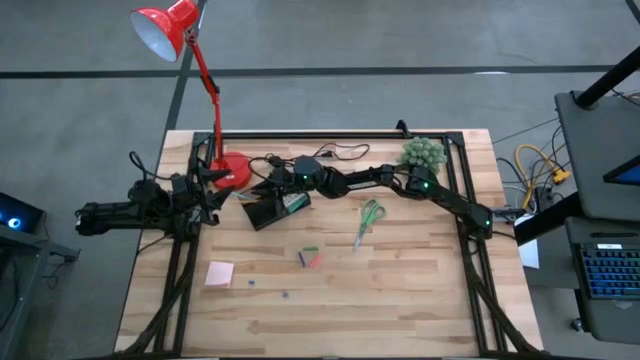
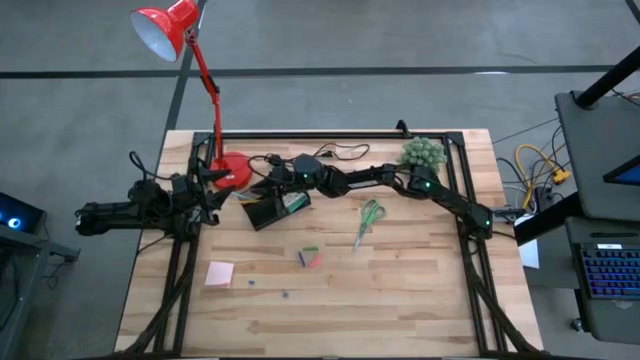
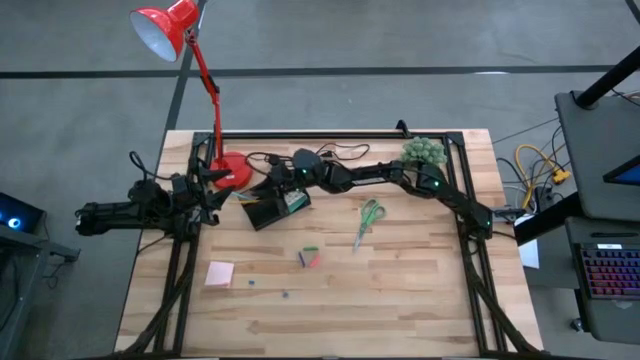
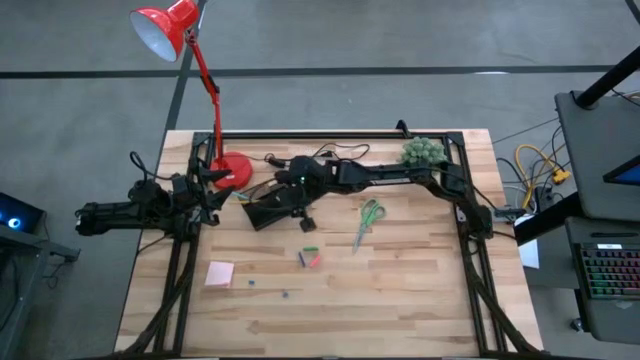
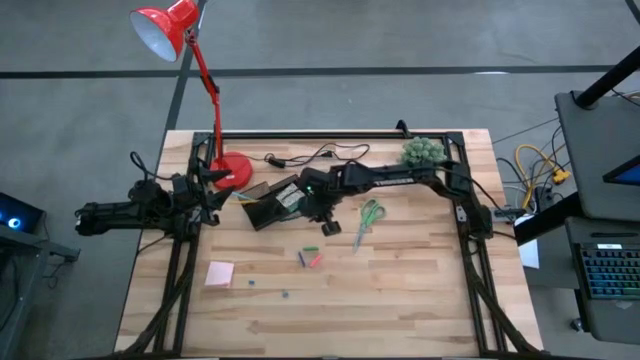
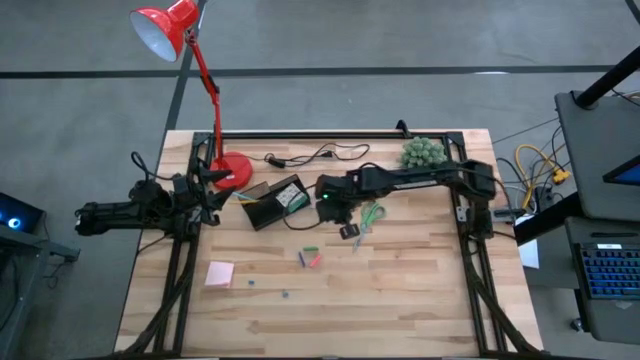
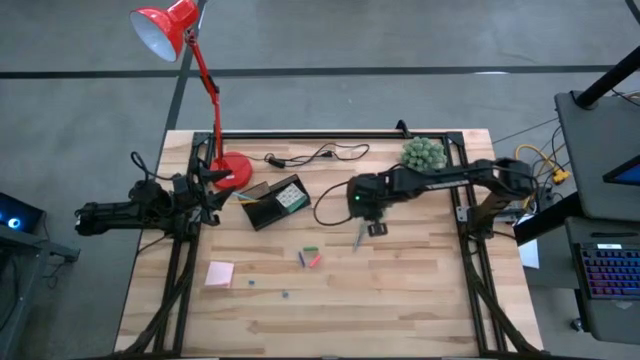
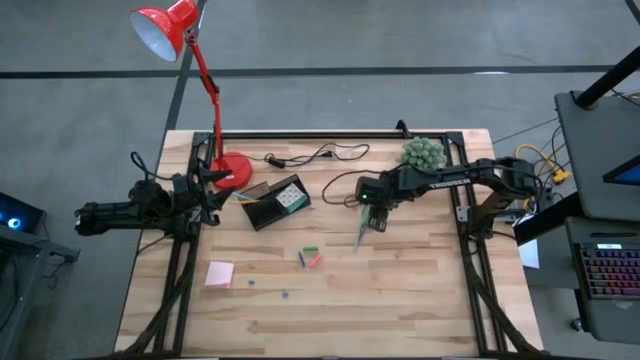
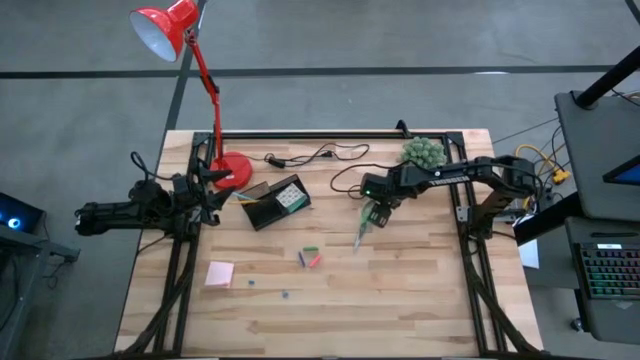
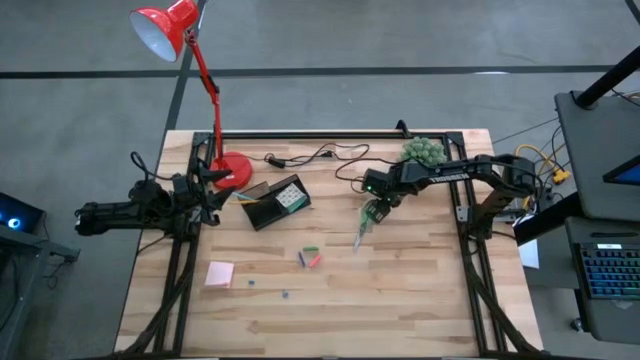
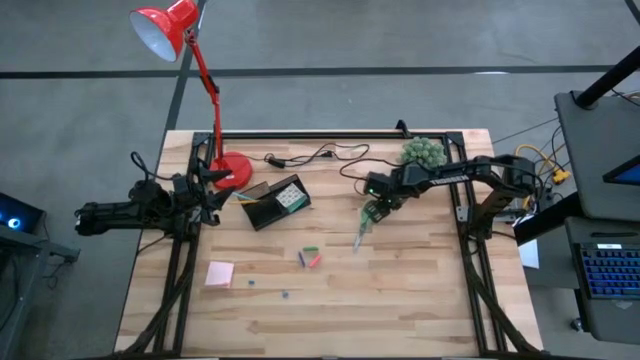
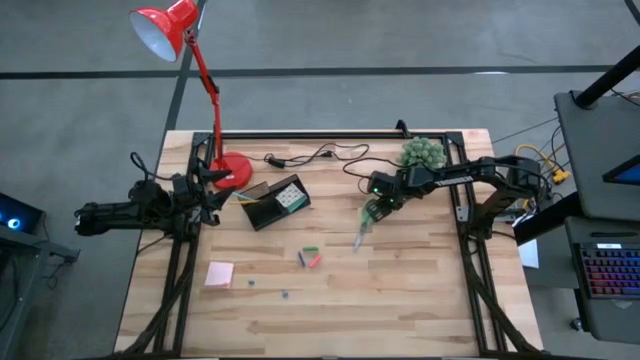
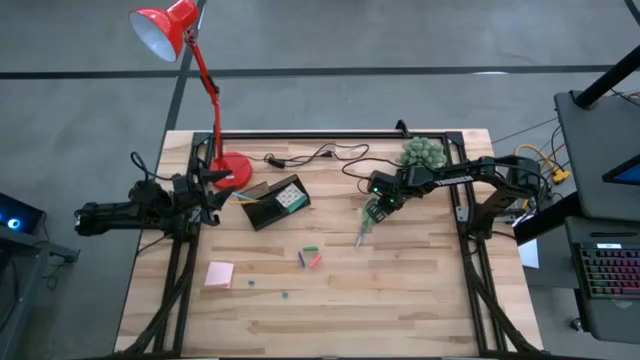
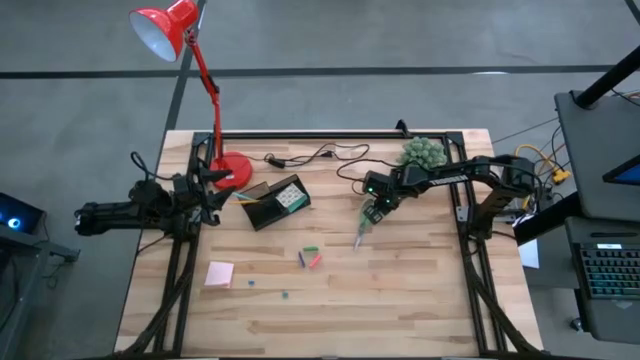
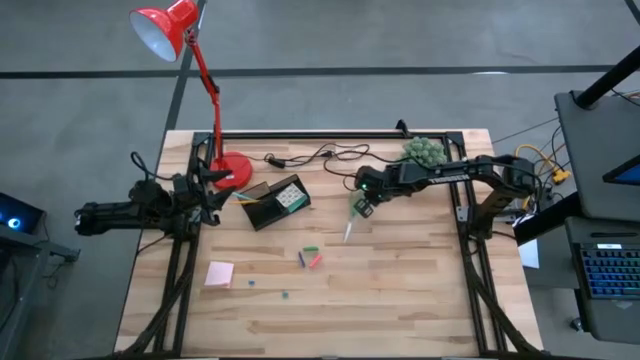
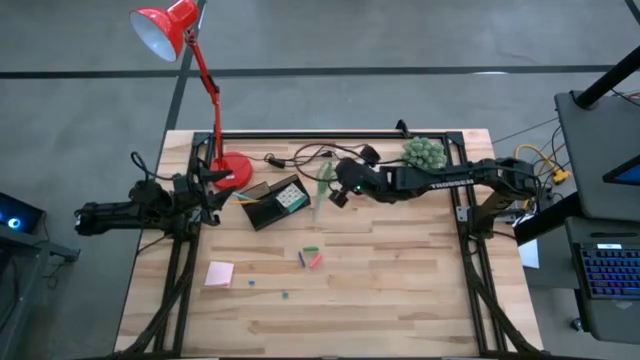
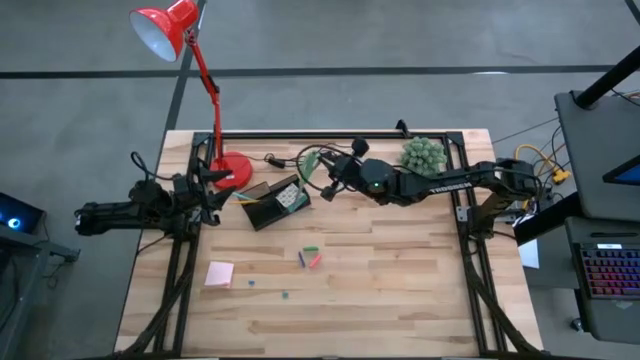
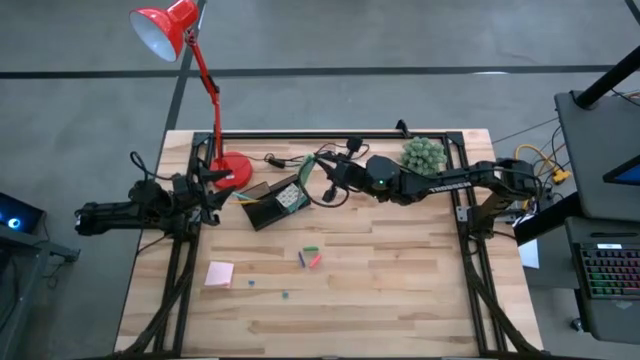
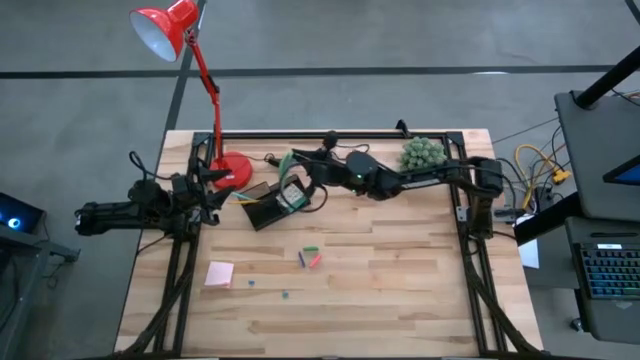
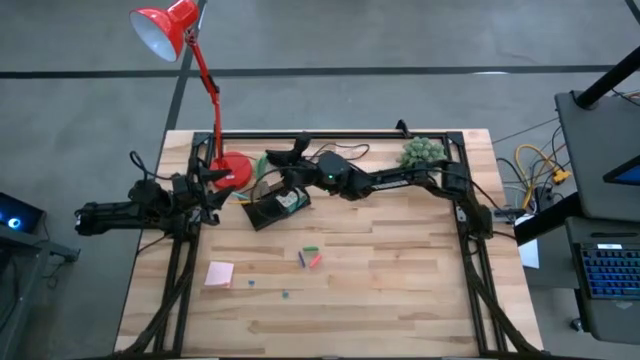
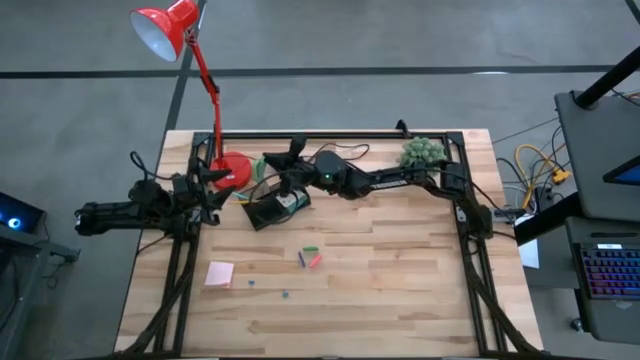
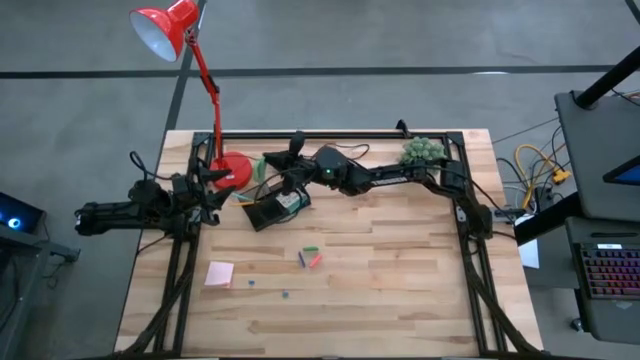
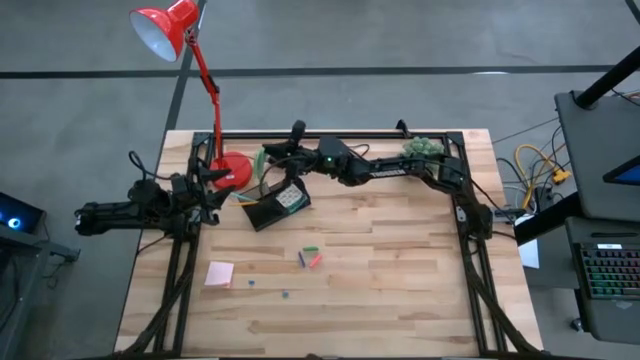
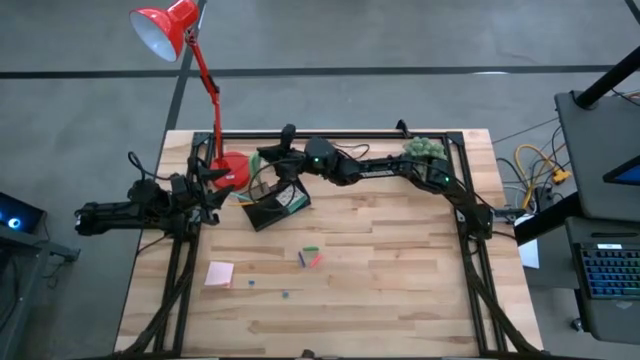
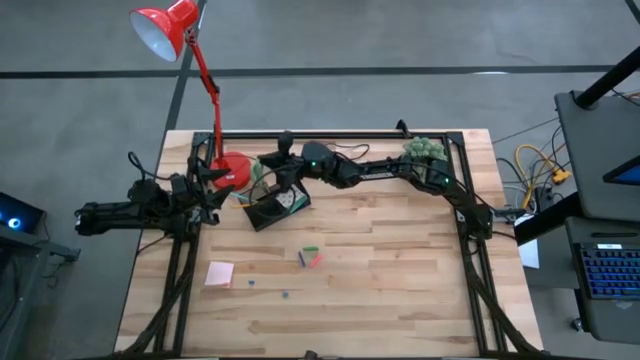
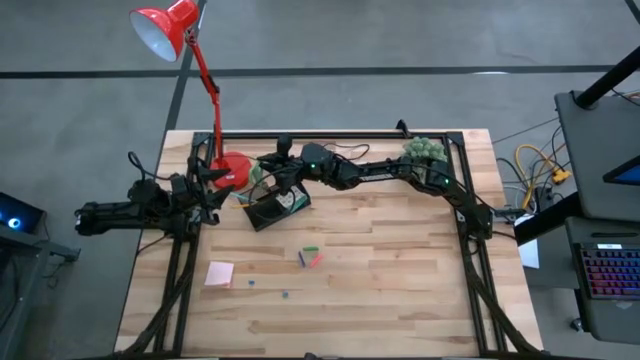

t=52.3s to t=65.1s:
Task: Pick and place office supplies into organizer
Put the green scissor into the desk organizer

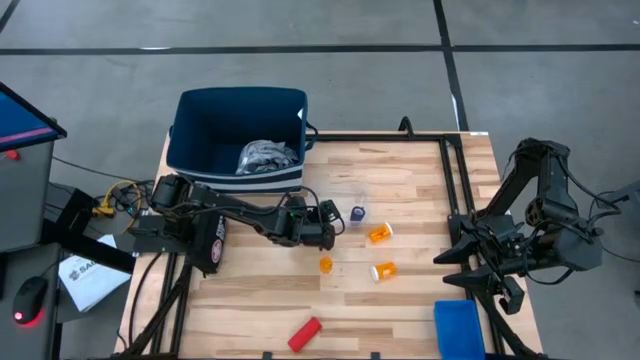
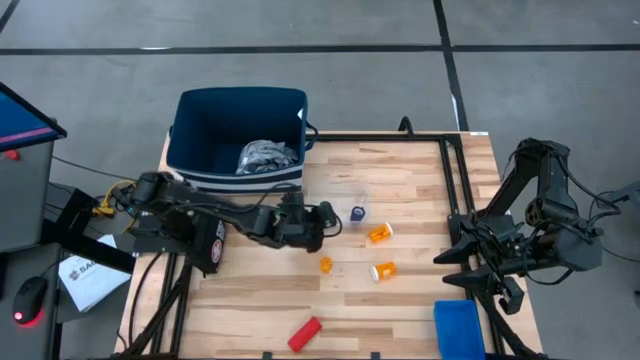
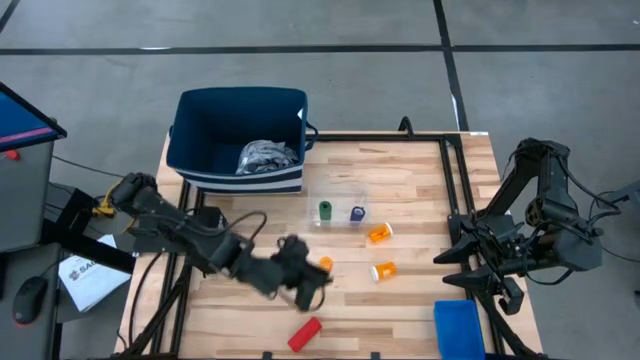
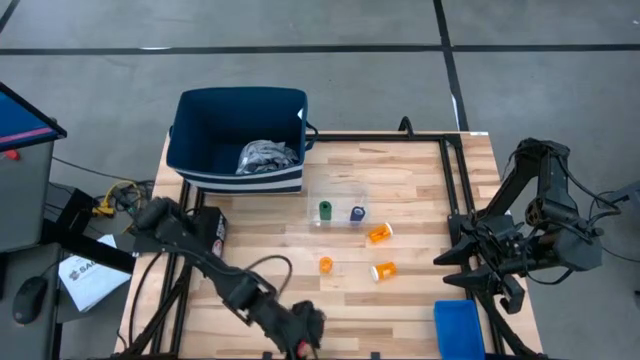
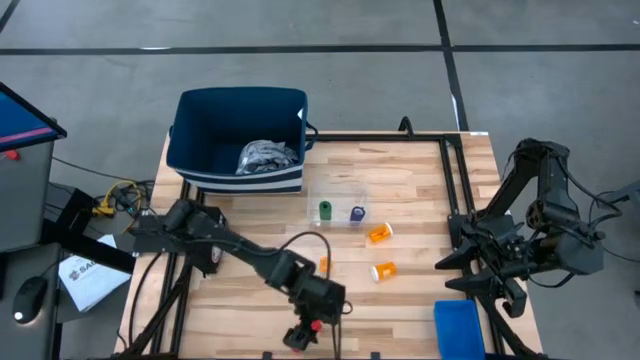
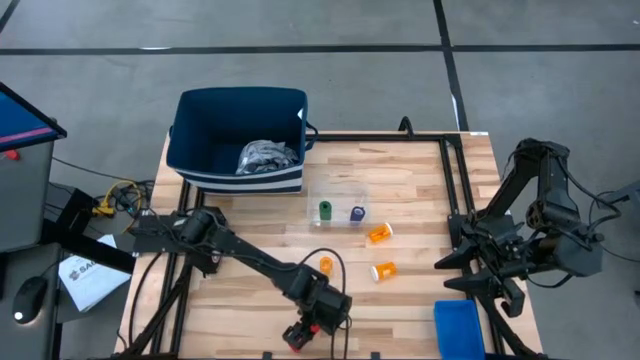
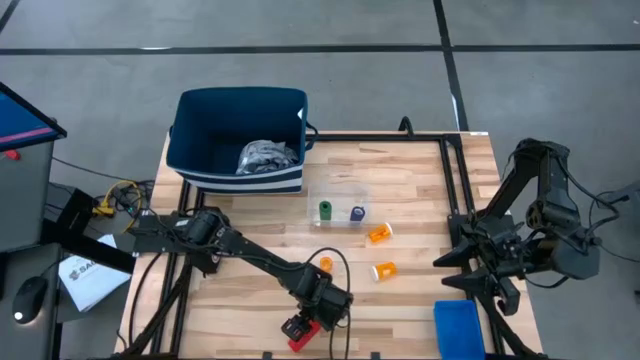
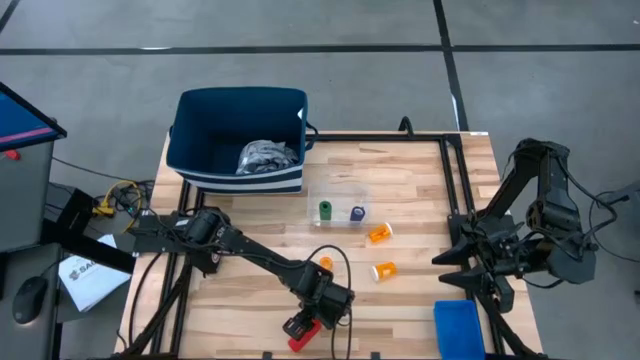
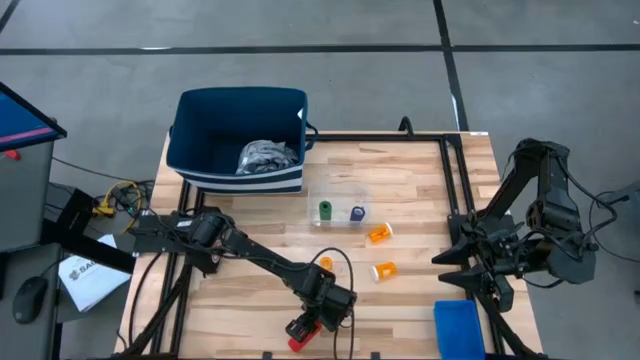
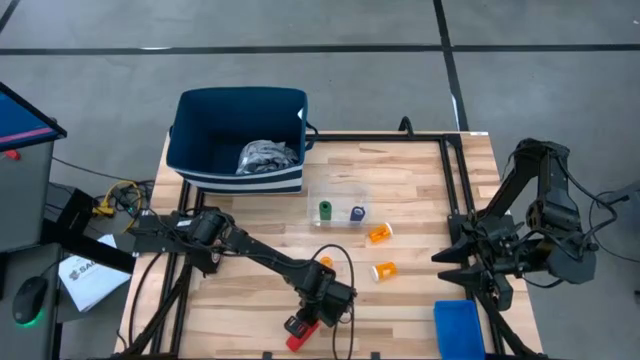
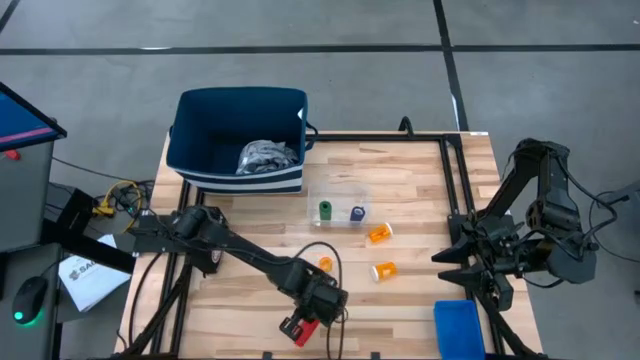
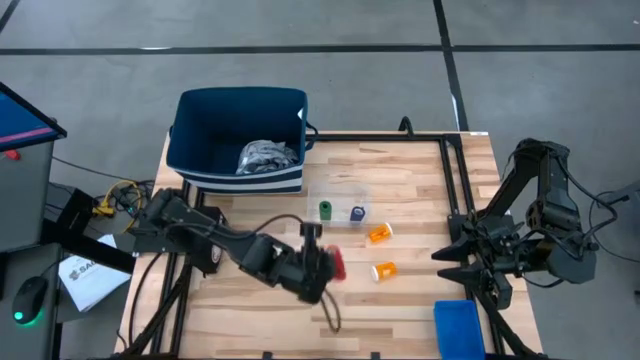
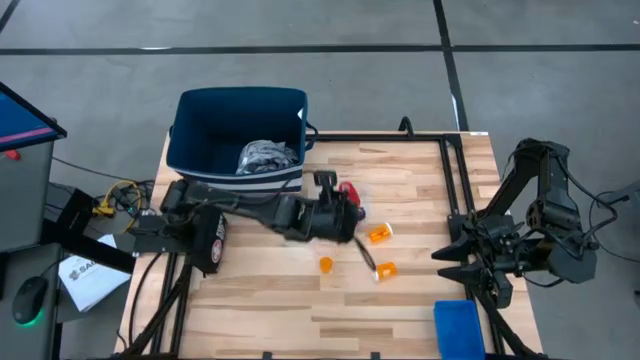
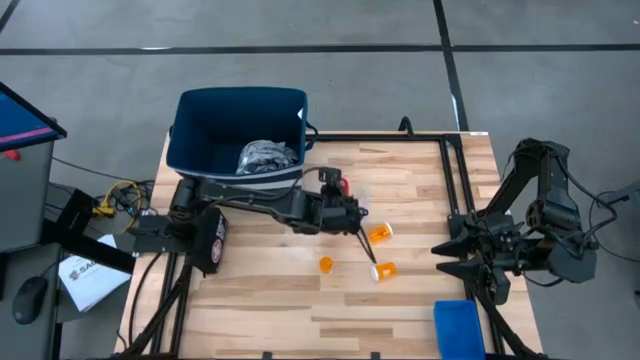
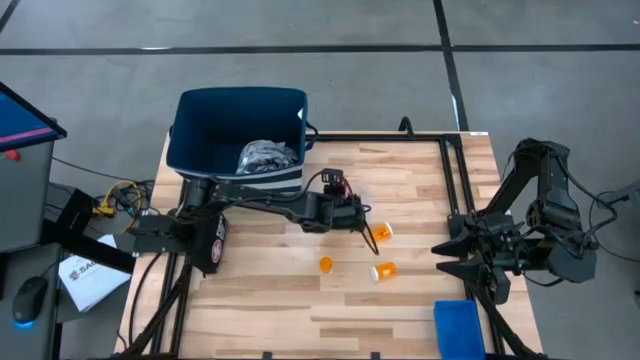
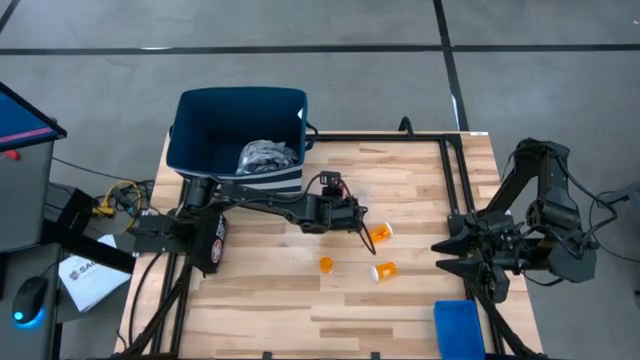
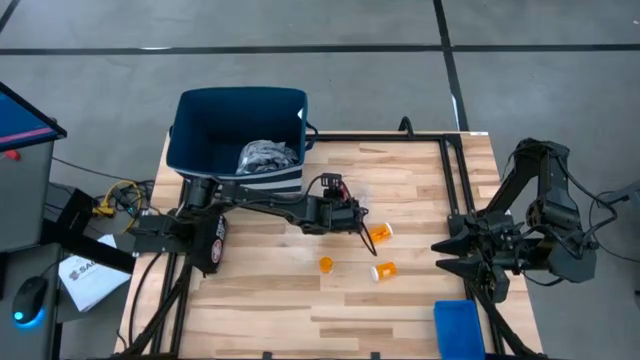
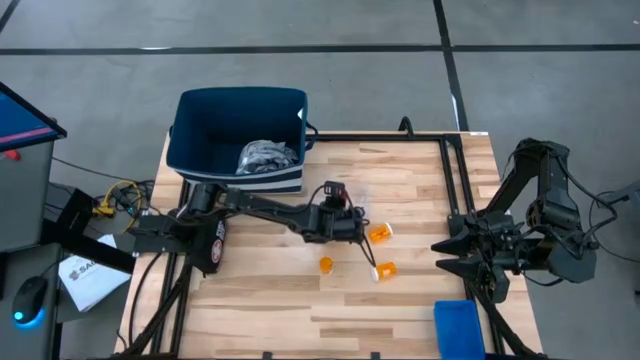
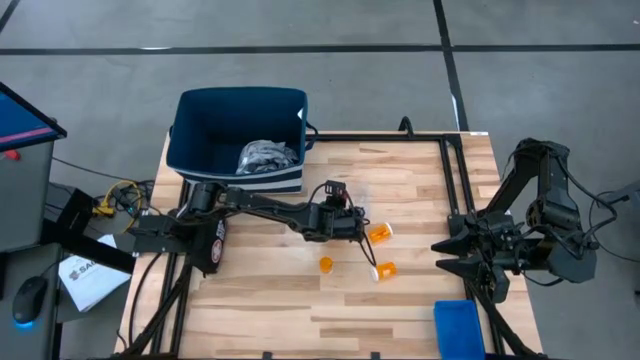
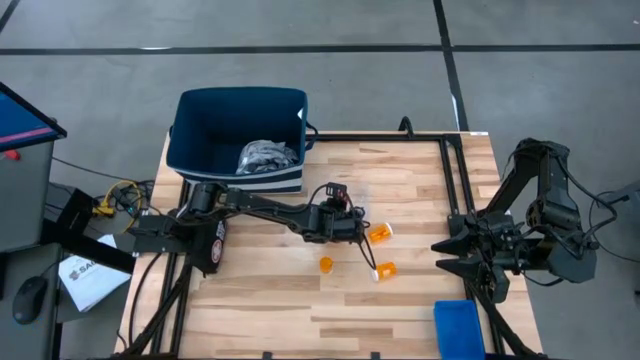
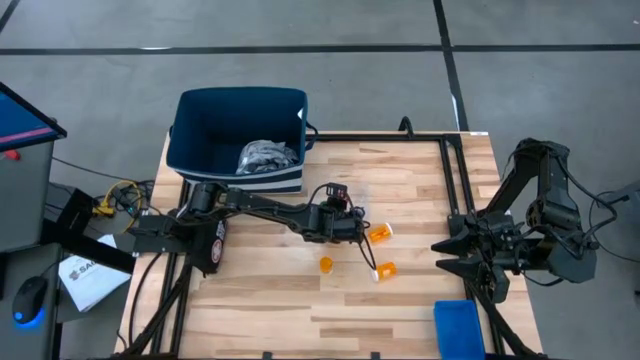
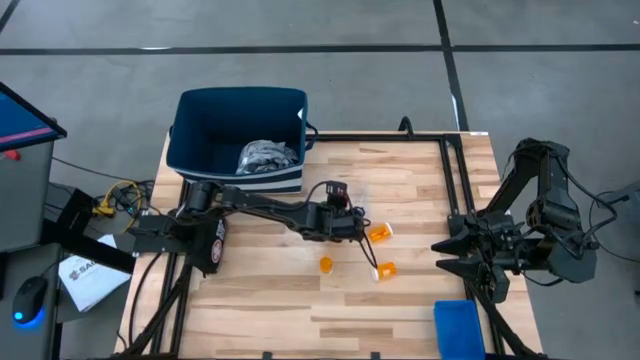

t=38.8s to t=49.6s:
Task: Pick & place medical supplies in basket/bin
Put the red bandage into the transparent bin
